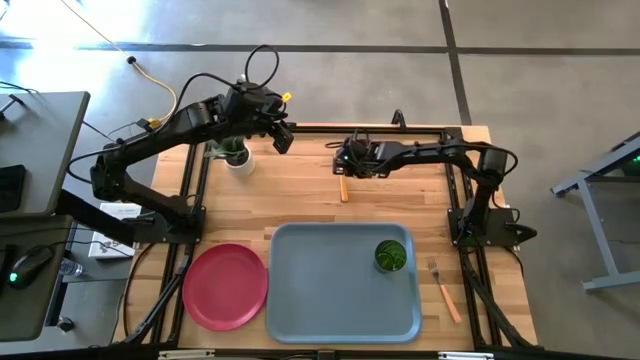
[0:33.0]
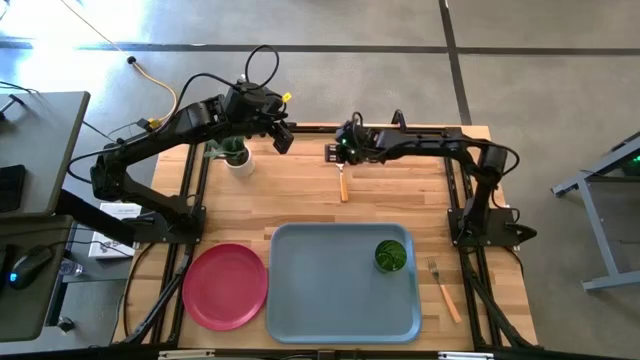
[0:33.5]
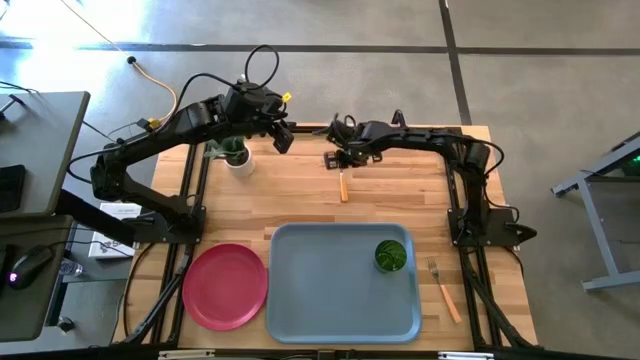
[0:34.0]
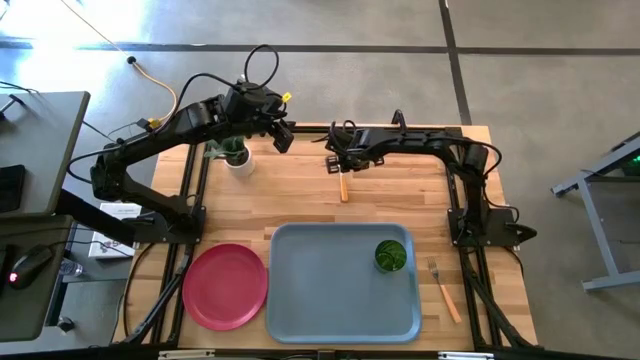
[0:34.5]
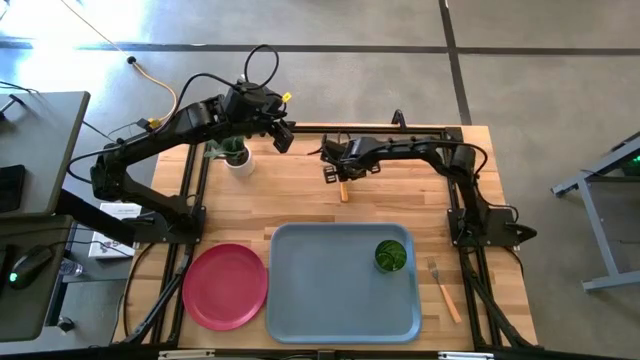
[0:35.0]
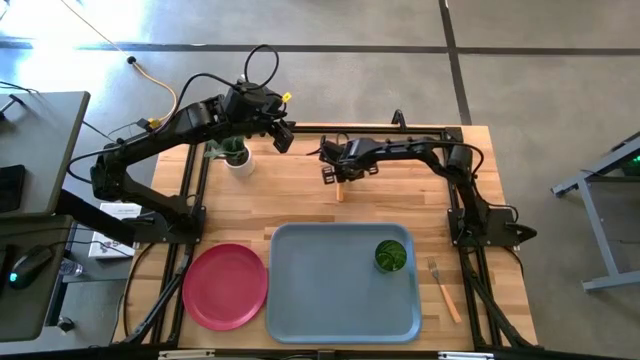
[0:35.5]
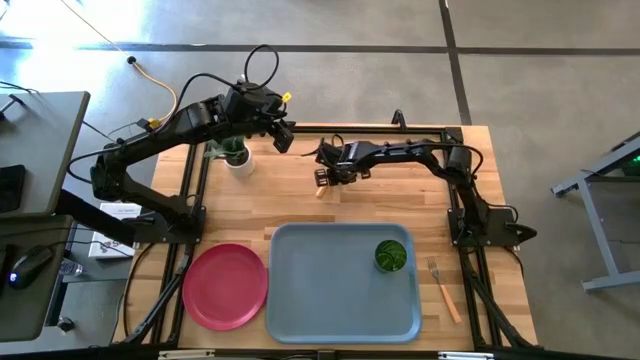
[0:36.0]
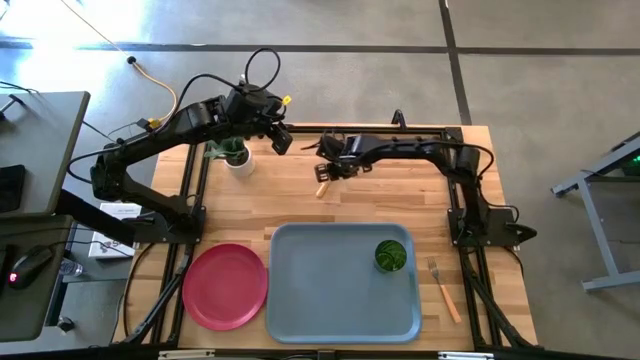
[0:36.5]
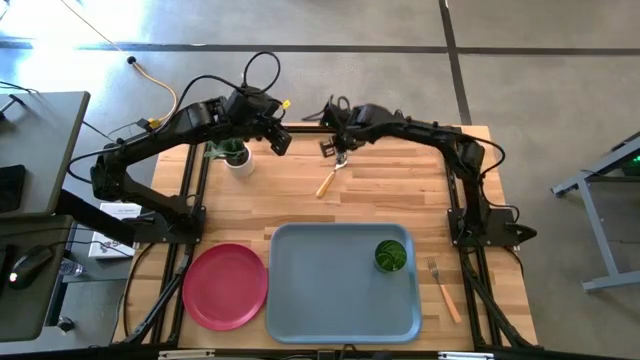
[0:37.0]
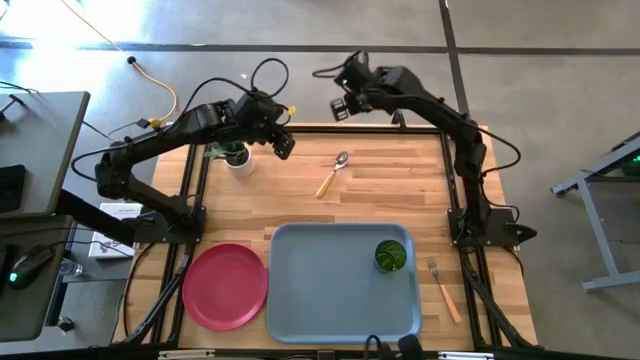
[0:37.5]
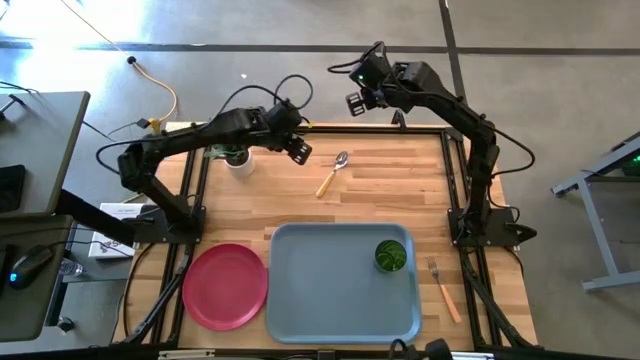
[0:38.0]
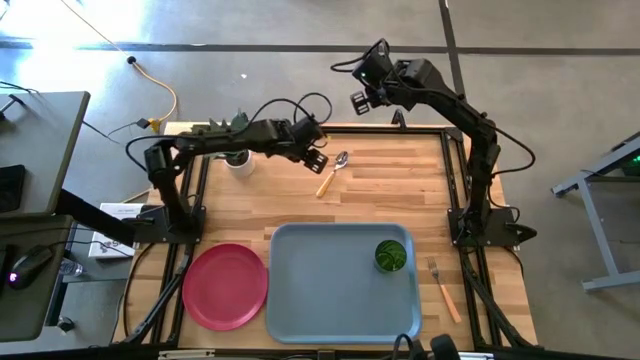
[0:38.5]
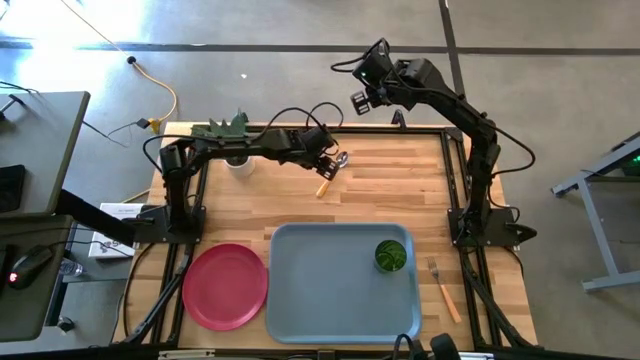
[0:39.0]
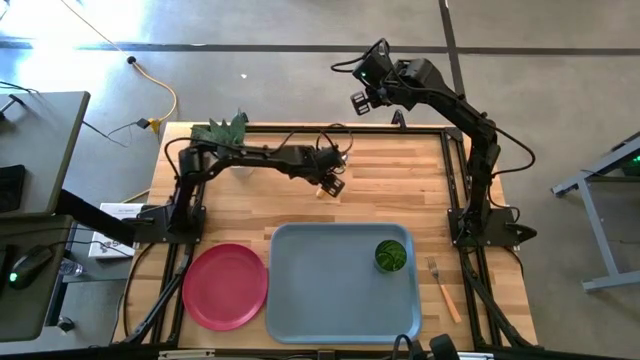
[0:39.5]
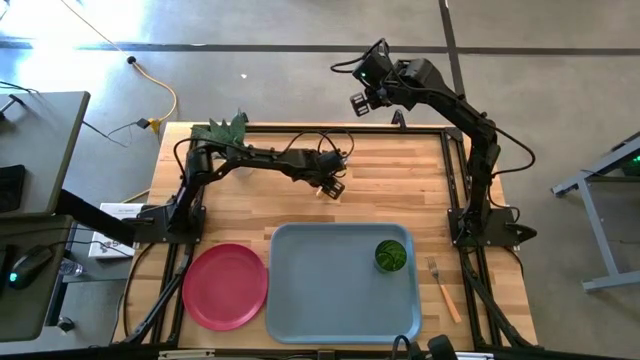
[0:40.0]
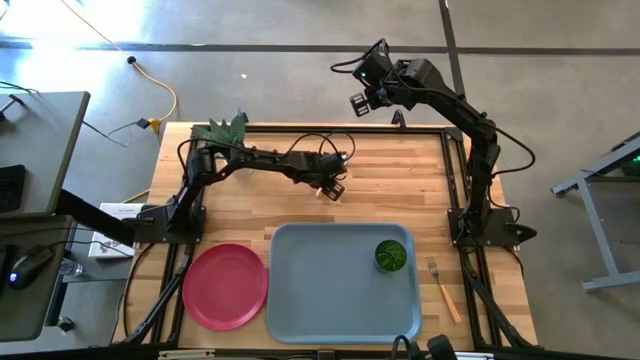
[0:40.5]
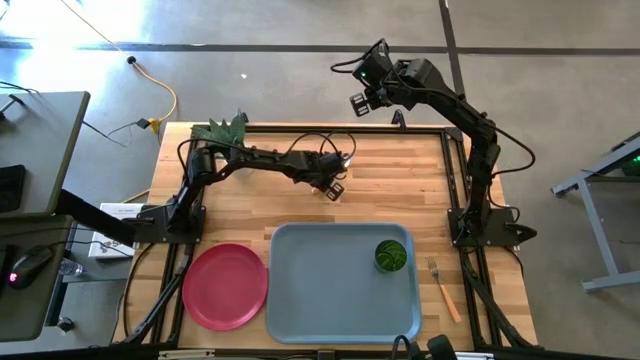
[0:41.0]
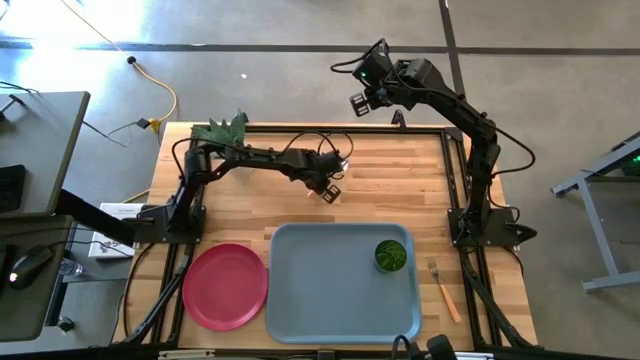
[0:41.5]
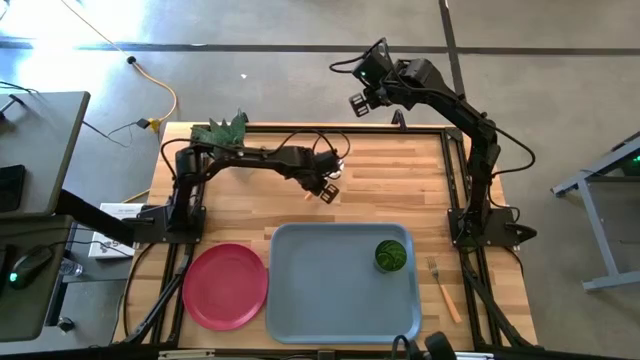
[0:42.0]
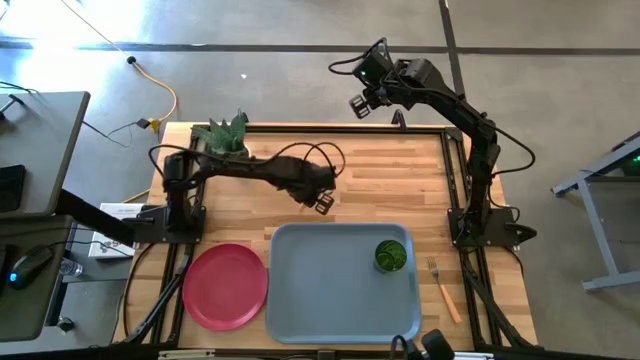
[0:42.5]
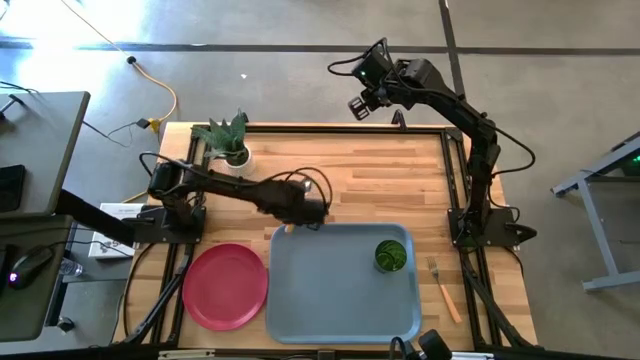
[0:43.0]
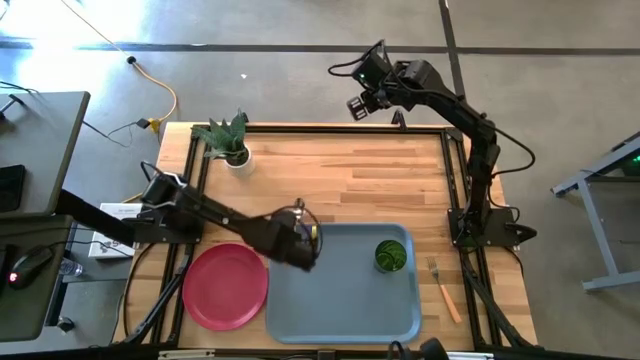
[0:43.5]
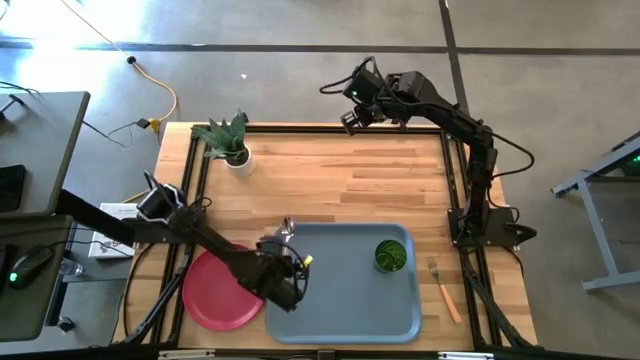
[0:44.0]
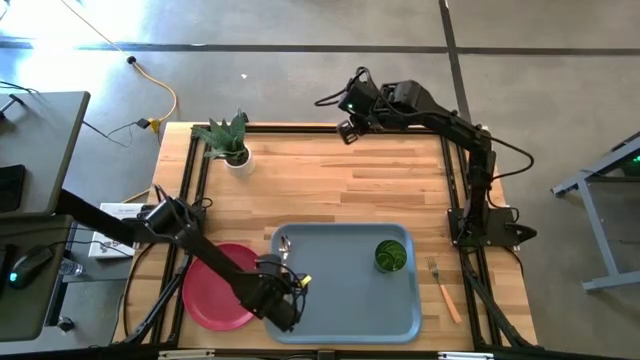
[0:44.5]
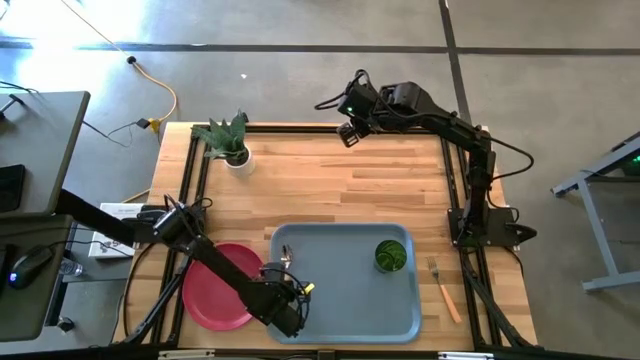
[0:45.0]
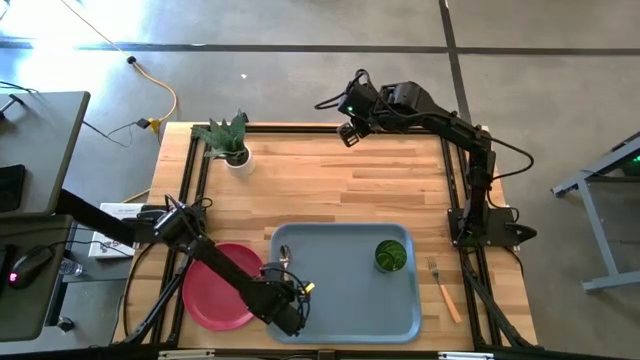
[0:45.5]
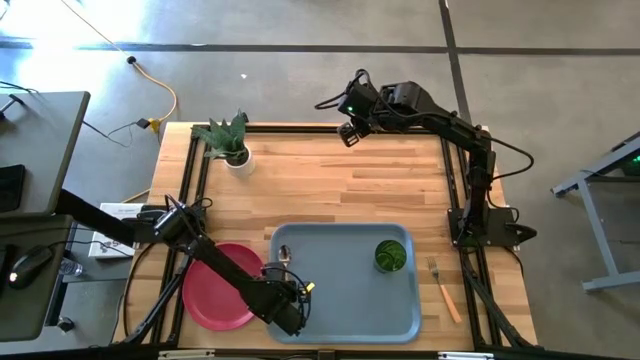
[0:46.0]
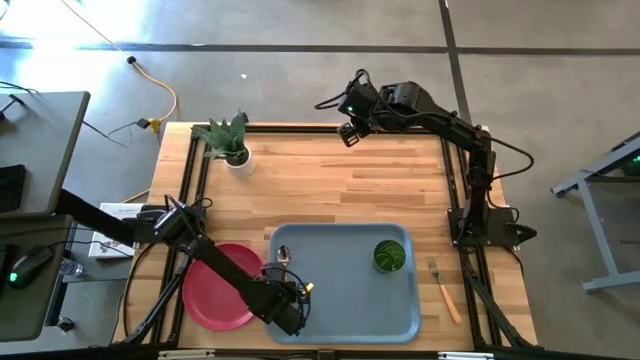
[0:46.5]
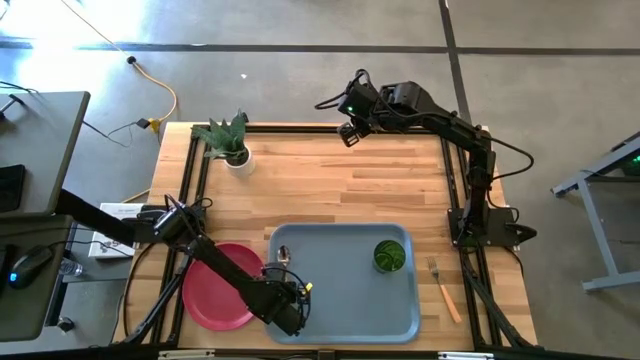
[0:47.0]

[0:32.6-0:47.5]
Task: Pick and place plate/cup/fork/spoon on tray
Put the yellow spoon on the blue tray

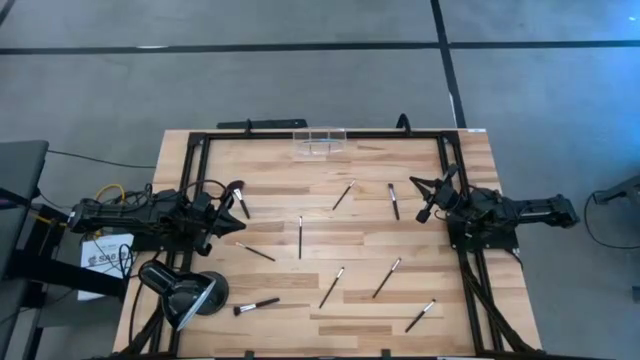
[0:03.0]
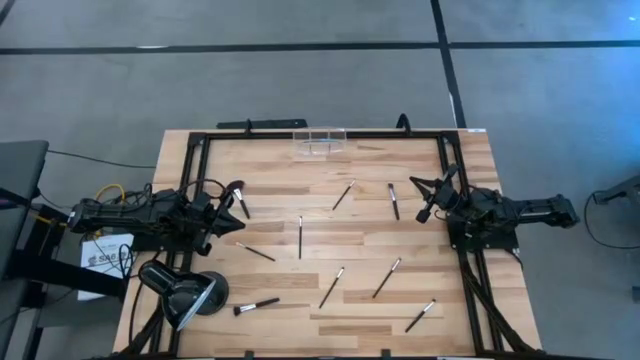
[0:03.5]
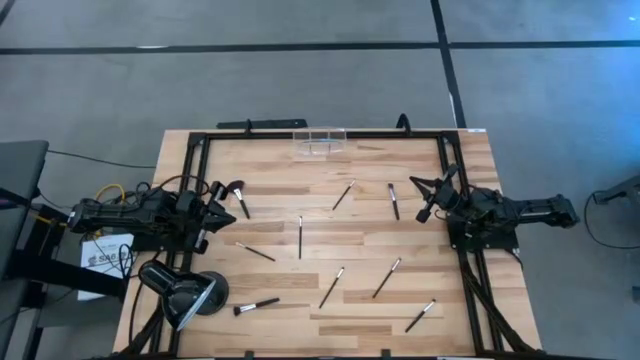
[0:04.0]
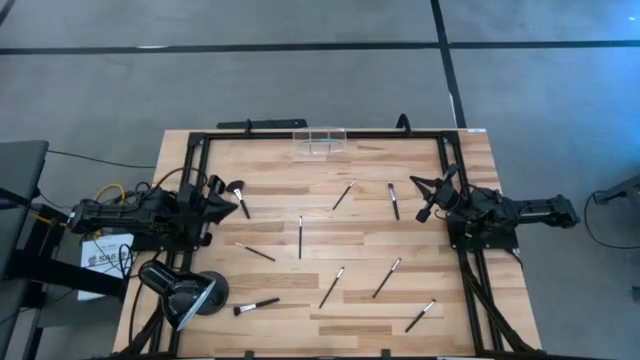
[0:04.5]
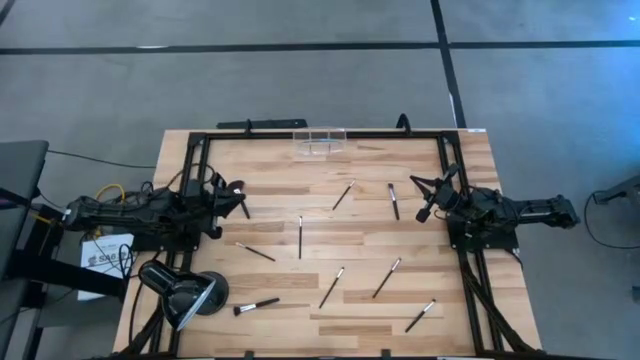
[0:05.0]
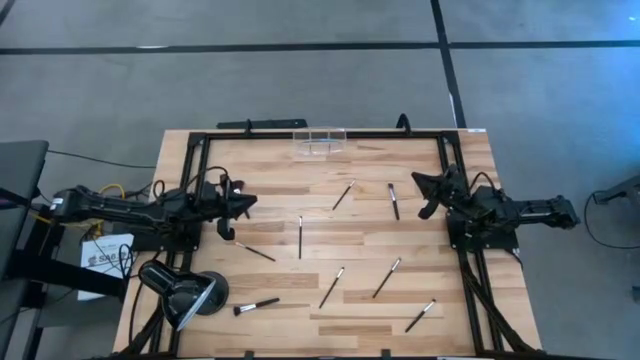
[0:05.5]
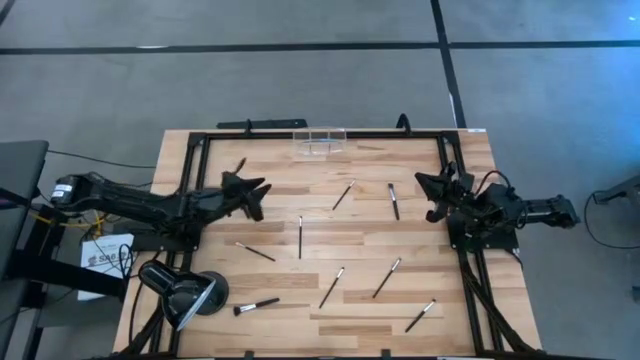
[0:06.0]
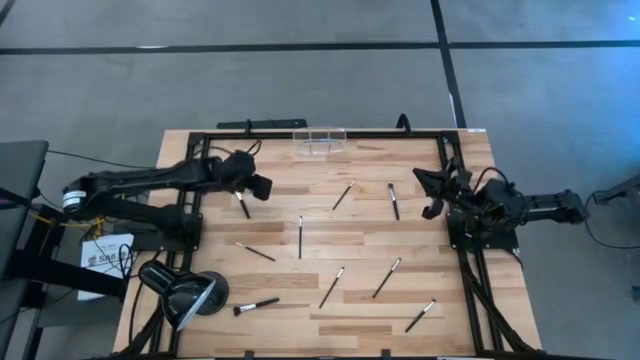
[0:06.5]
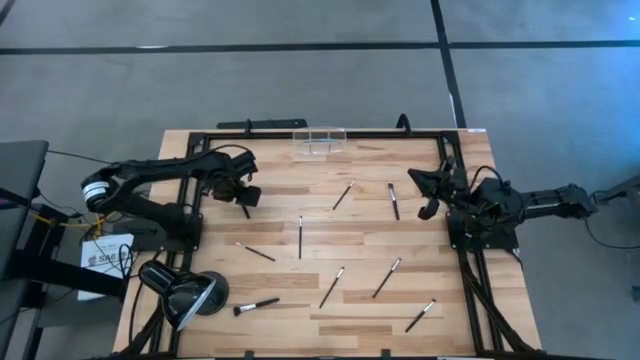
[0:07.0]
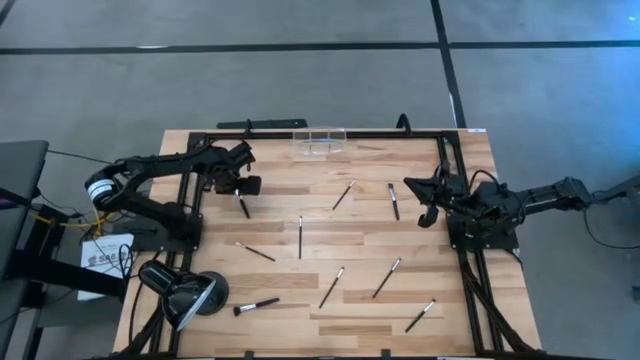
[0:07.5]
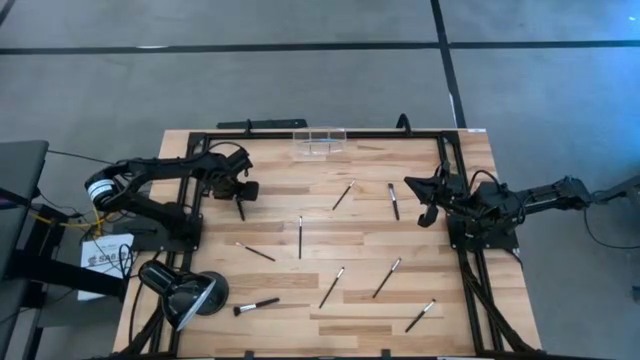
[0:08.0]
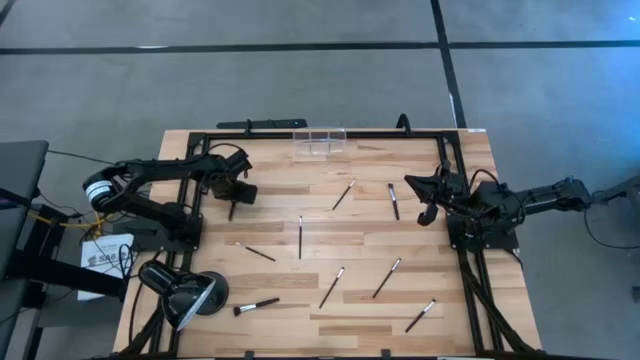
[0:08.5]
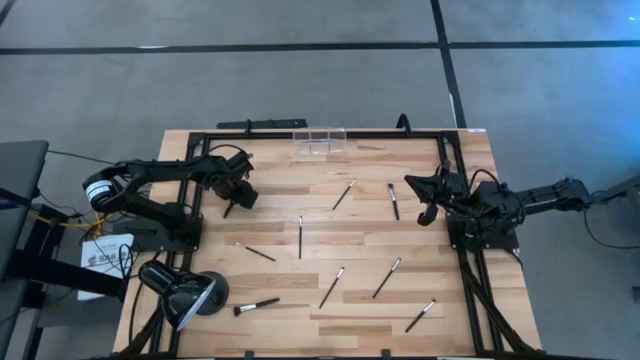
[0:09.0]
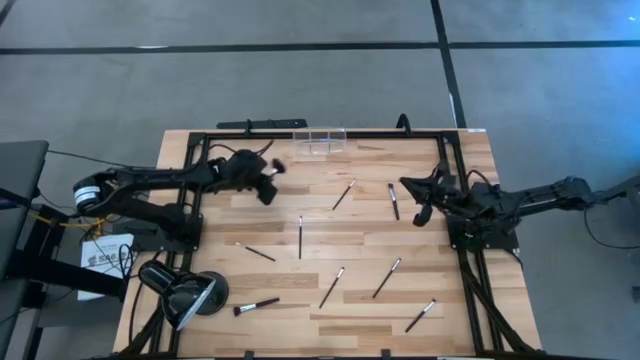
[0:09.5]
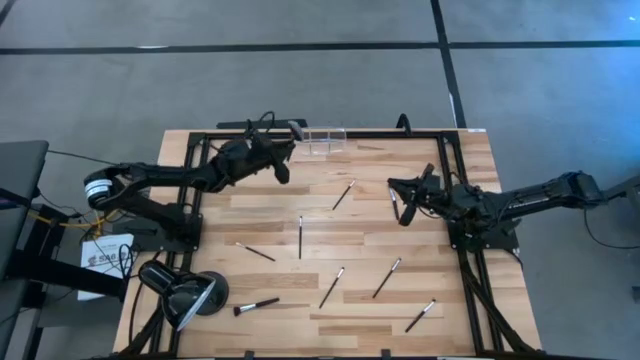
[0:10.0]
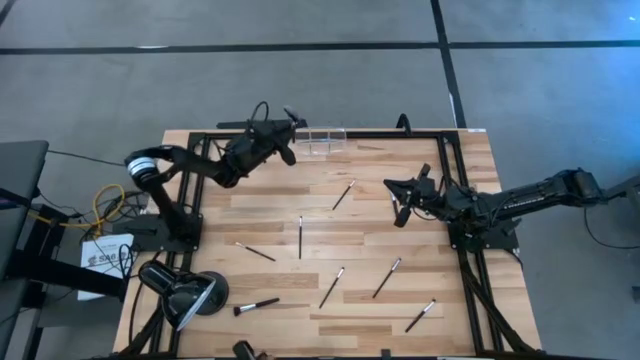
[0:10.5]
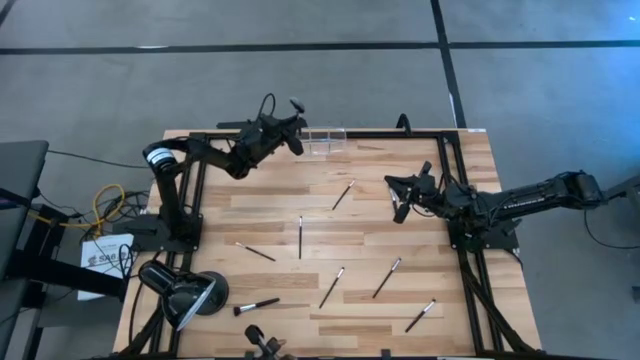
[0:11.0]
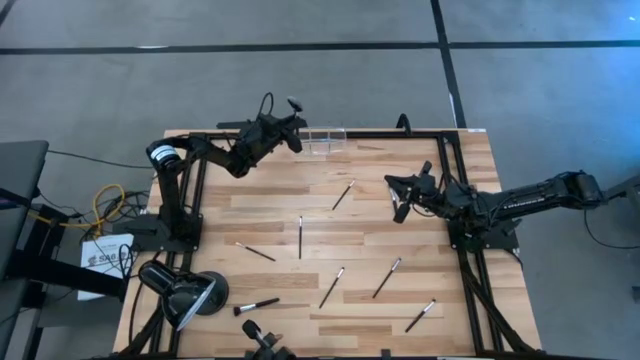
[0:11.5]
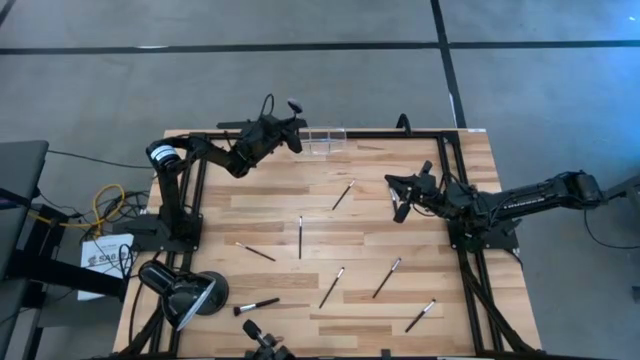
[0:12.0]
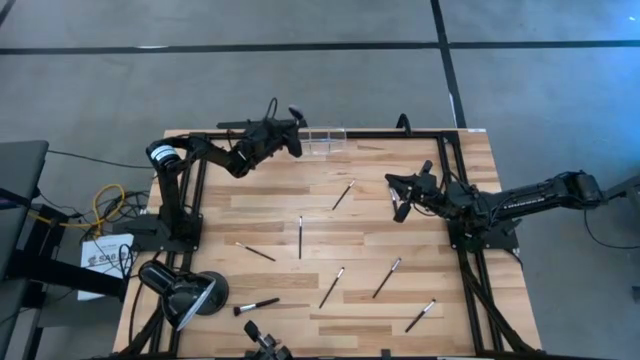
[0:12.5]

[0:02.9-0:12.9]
Task: Sort items
Put the highlighter brush into the left section of the transparent organizer
